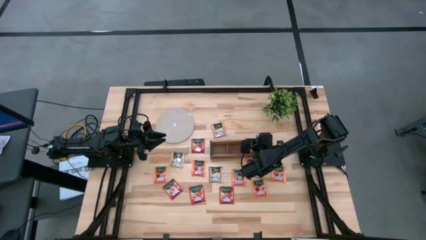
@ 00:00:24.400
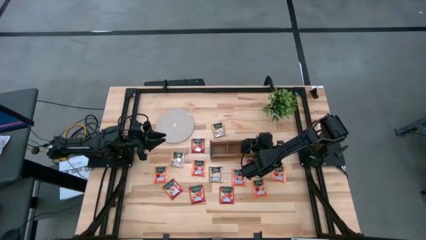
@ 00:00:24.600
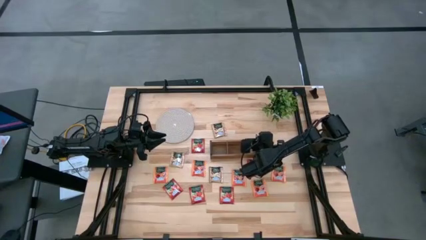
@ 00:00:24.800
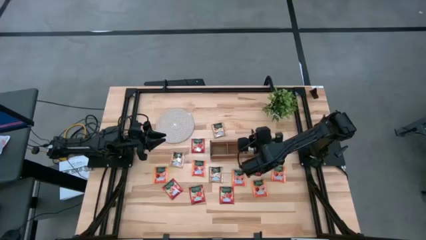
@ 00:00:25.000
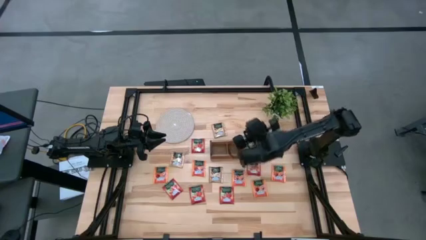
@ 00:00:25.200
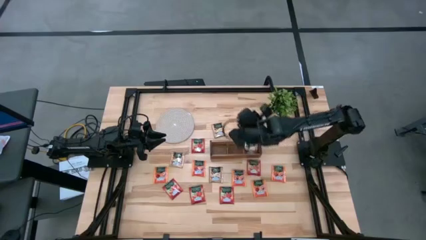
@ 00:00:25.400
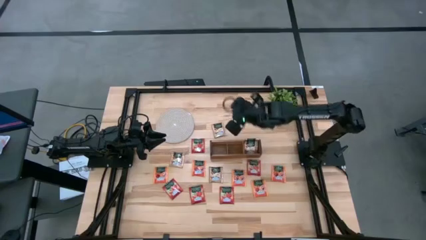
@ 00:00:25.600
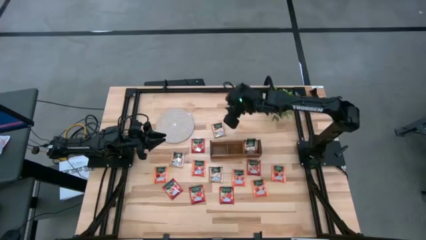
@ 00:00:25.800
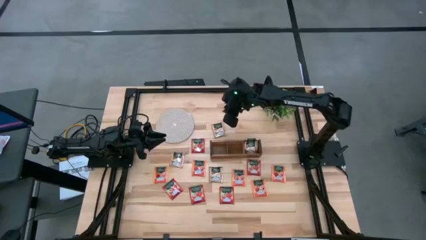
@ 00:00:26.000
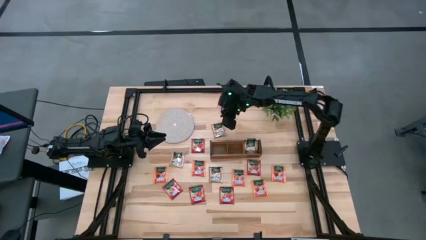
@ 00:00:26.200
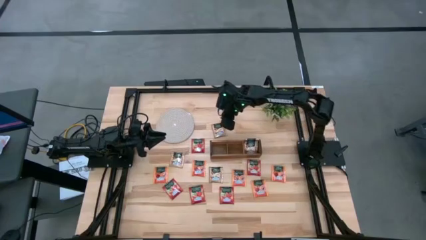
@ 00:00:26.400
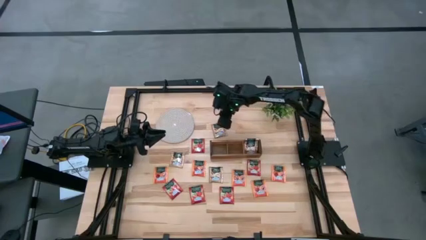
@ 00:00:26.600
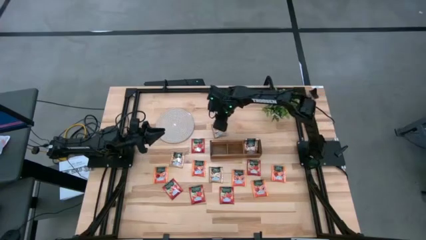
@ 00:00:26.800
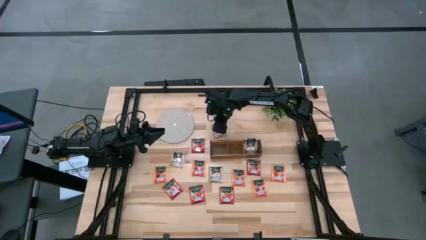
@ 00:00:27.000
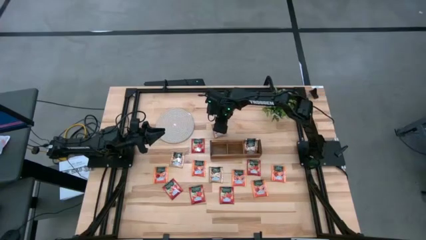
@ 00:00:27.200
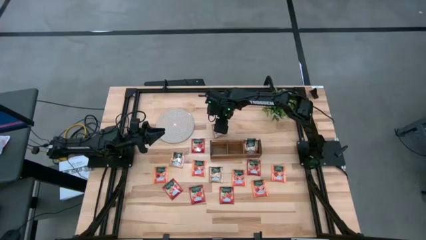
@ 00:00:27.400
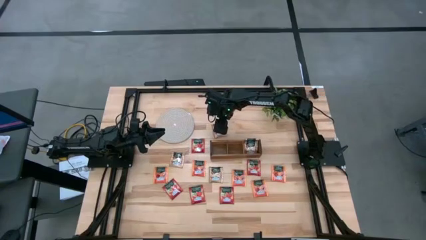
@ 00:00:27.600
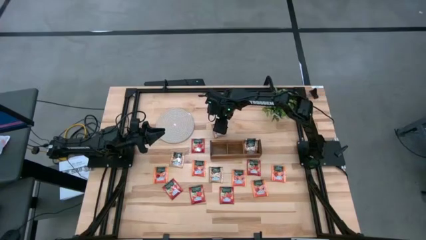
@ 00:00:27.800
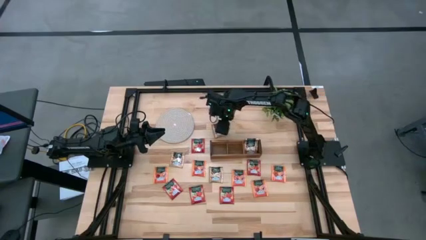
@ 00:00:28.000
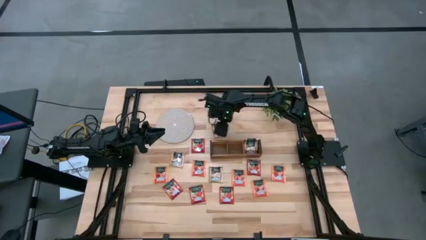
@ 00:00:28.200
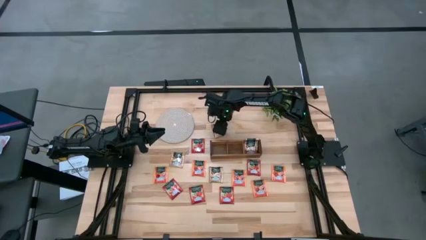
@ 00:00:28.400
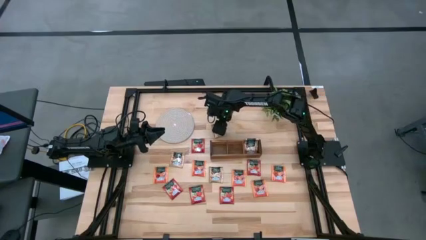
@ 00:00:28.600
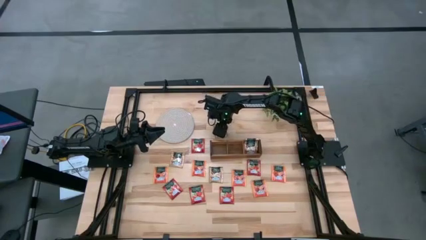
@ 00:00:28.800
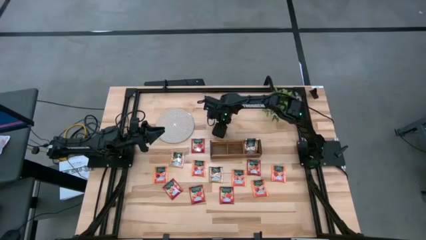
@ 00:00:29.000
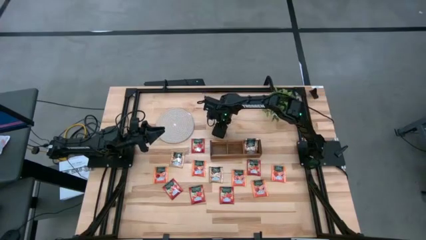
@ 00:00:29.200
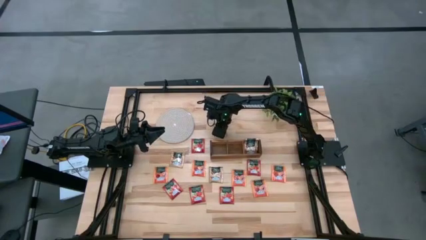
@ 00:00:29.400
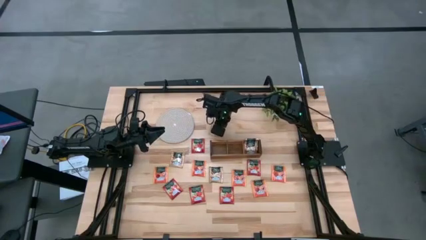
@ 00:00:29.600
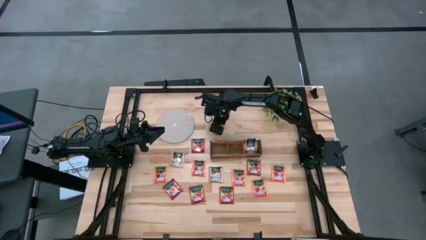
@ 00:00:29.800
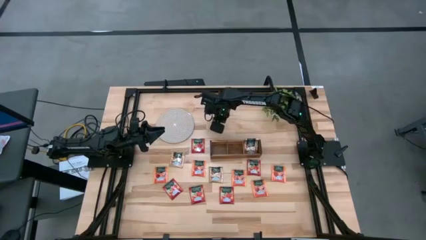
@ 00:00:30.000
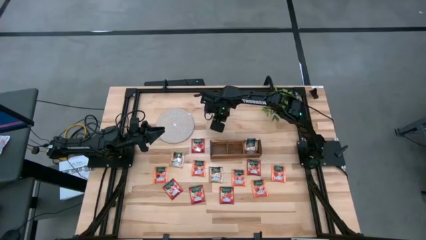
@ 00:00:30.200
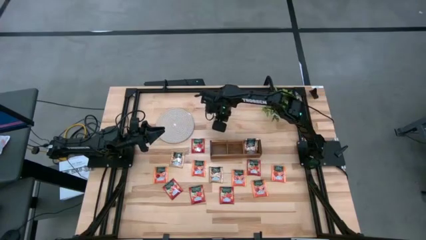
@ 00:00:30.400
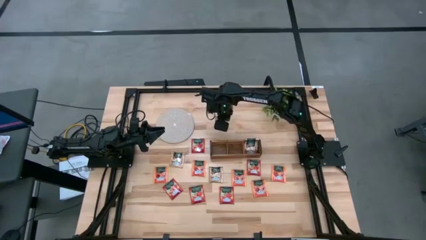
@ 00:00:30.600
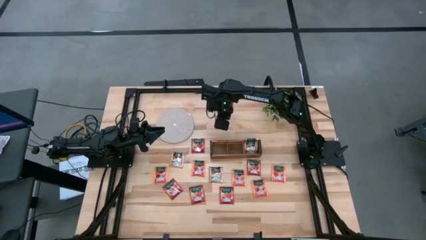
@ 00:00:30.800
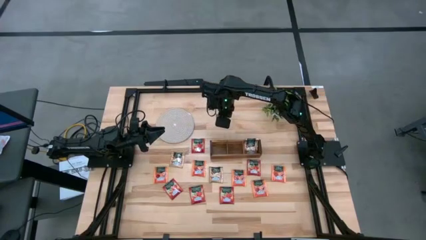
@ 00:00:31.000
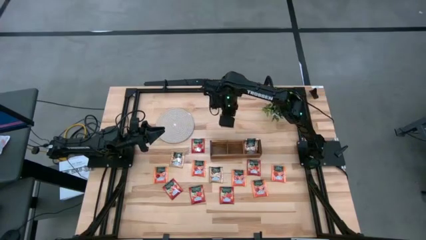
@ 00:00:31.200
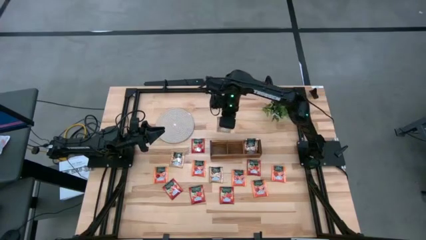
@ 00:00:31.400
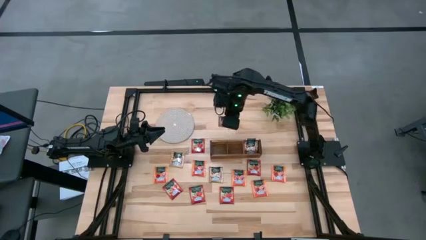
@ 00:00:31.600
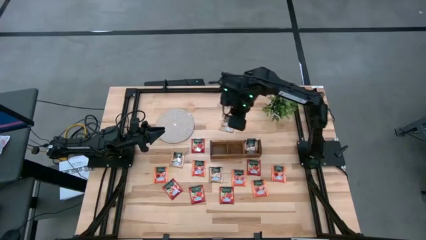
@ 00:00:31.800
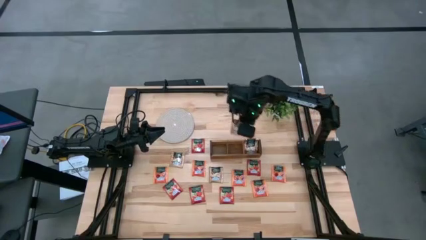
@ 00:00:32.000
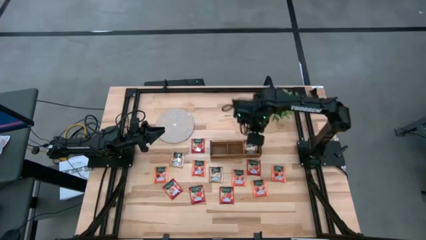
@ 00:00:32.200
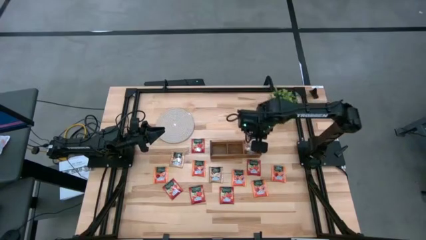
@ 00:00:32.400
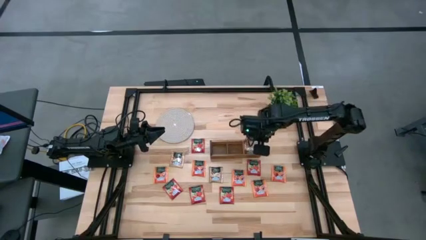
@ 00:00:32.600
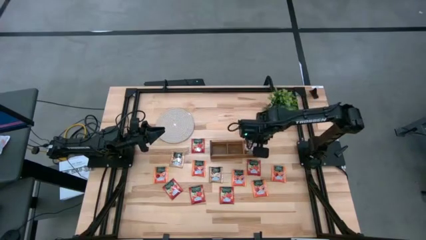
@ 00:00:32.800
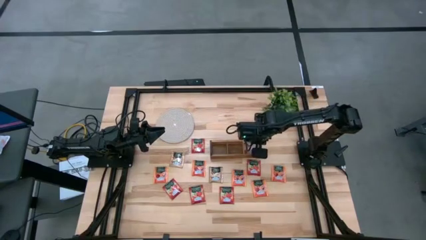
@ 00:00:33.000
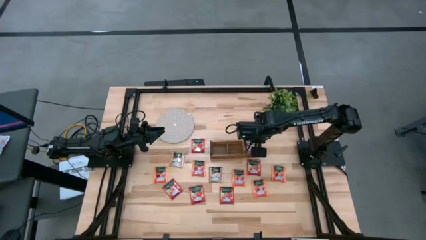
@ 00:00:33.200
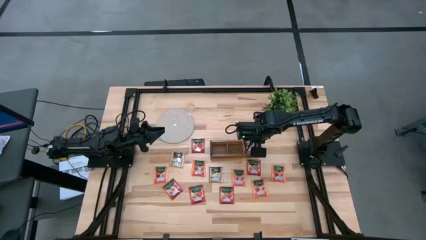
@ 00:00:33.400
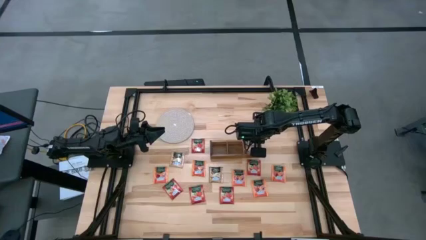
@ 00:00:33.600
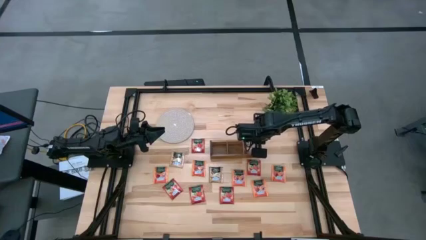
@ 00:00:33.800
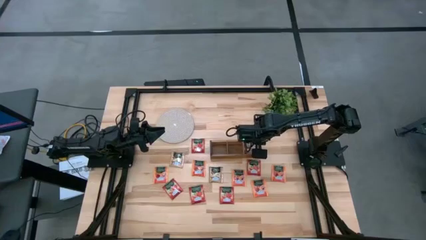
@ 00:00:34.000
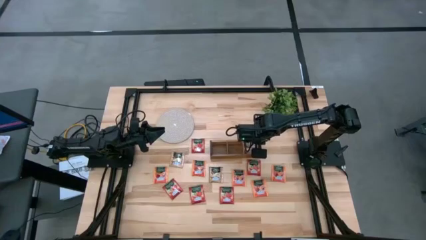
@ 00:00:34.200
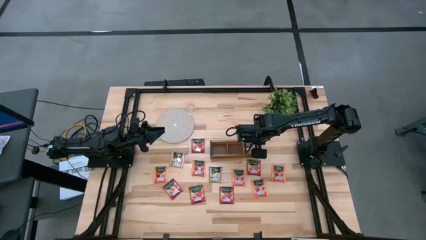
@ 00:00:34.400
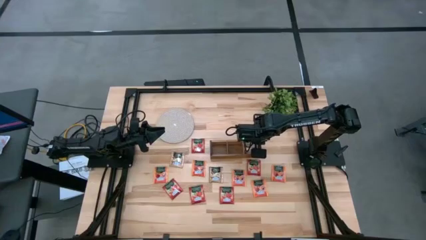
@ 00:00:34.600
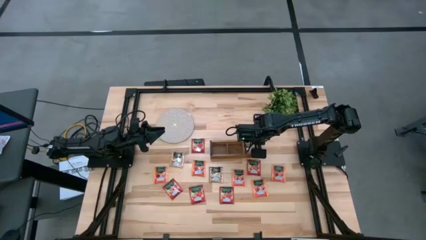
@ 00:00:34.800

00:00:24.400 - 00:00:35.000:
Task: Pick & Place Tea
Put the yellow tea bag into the right section of the wooden organizer
